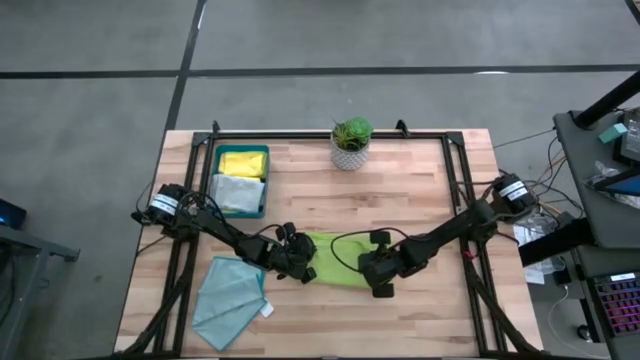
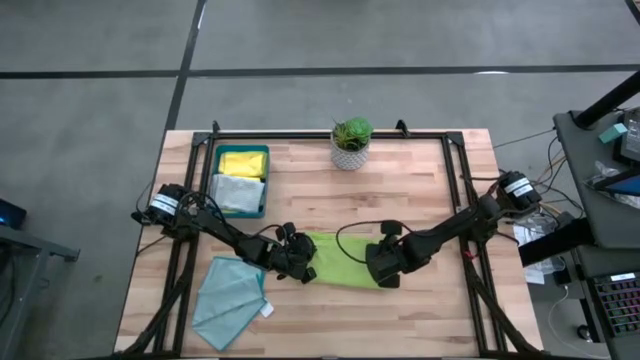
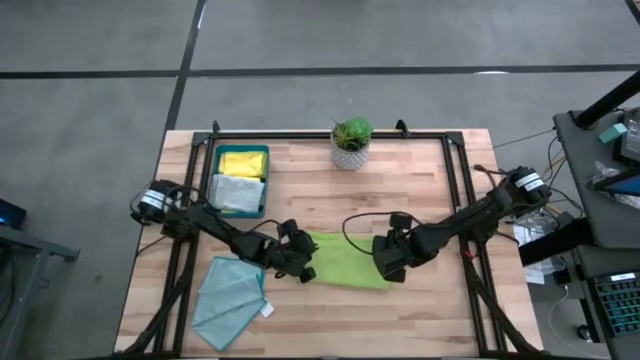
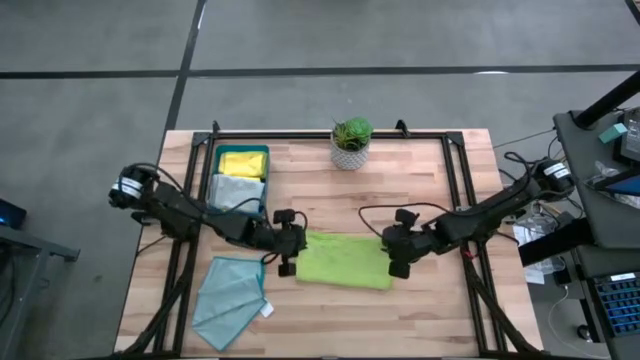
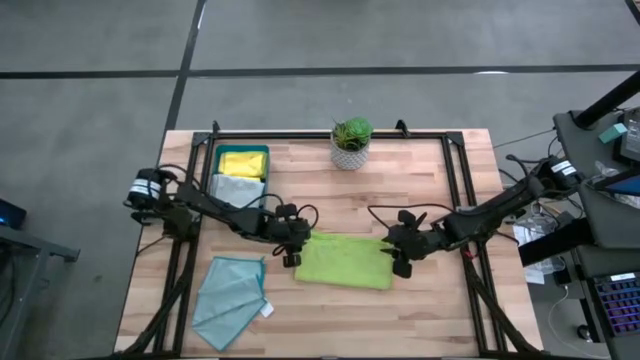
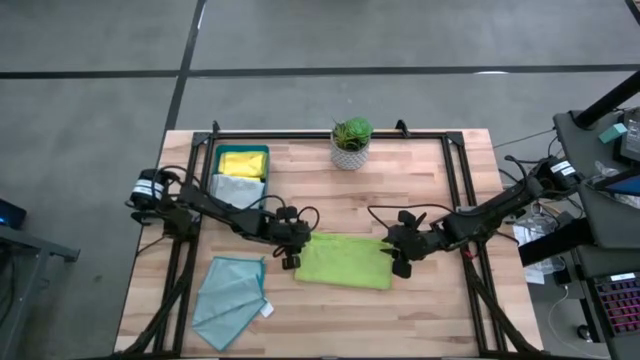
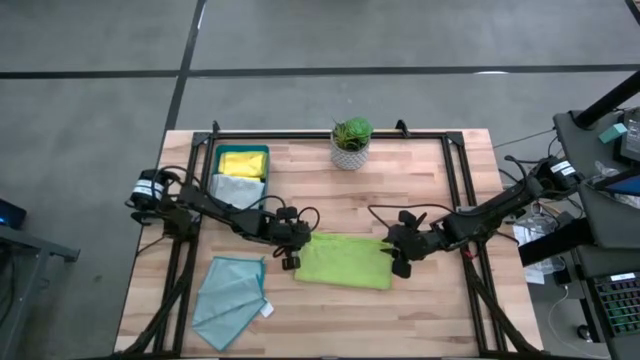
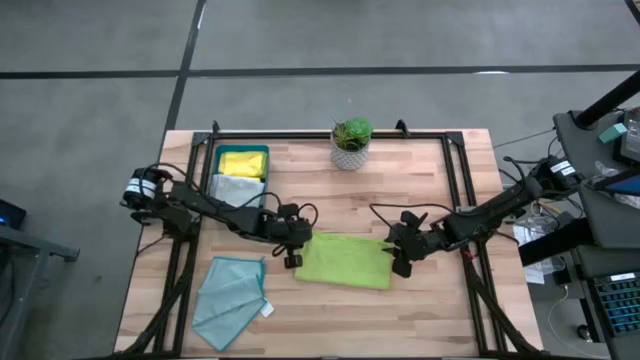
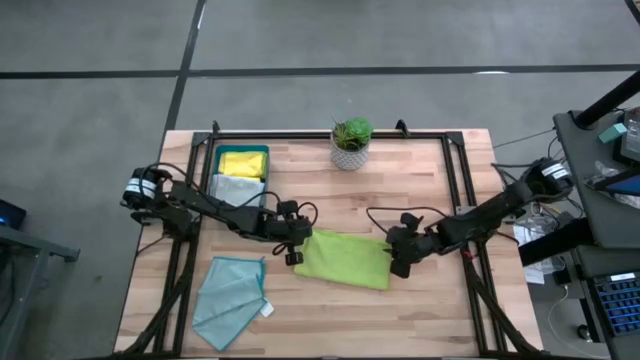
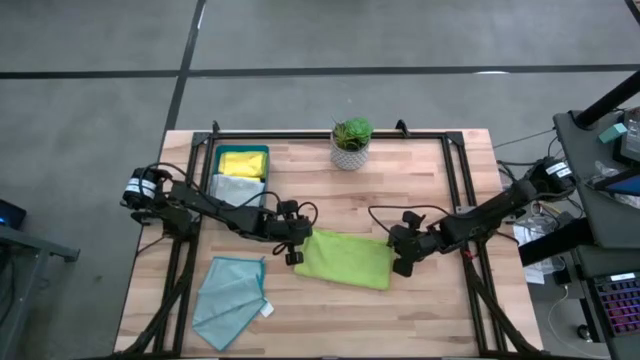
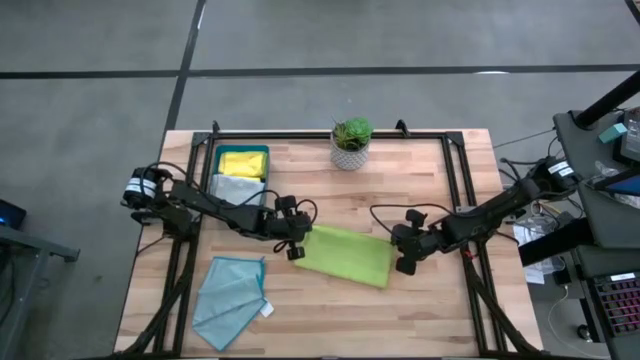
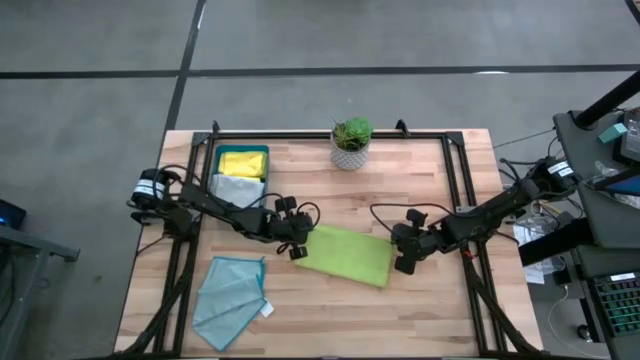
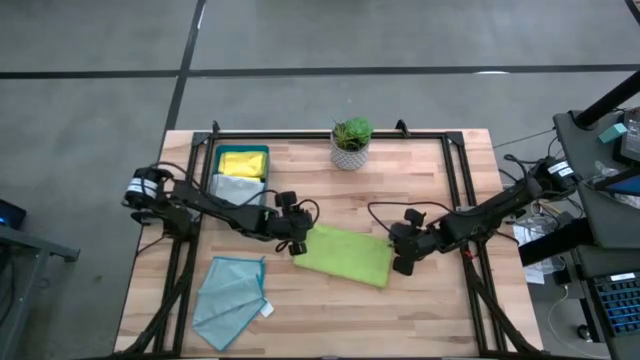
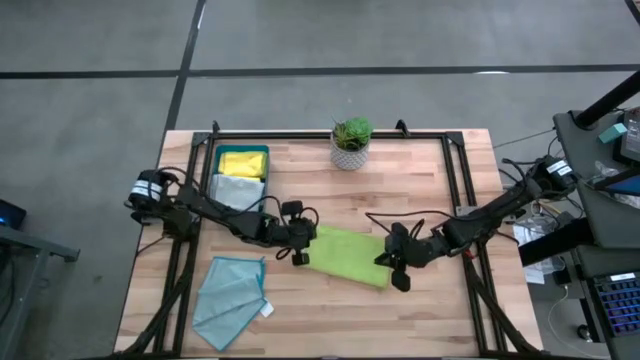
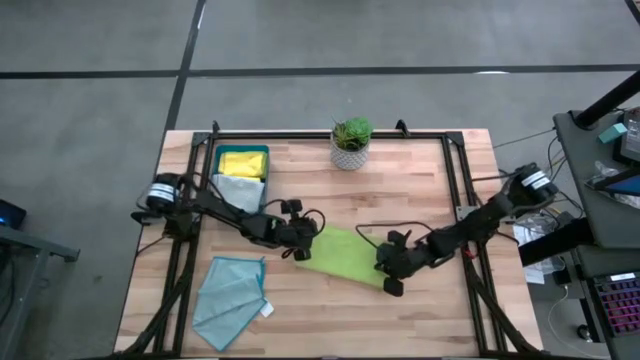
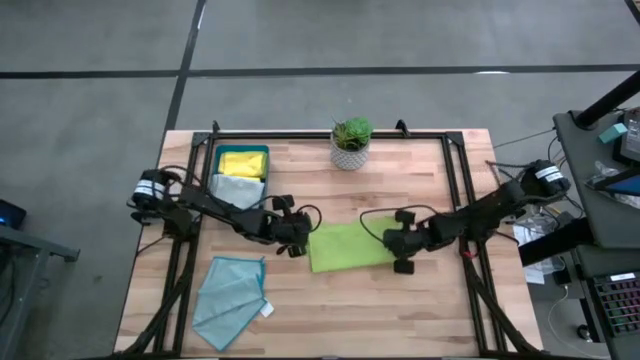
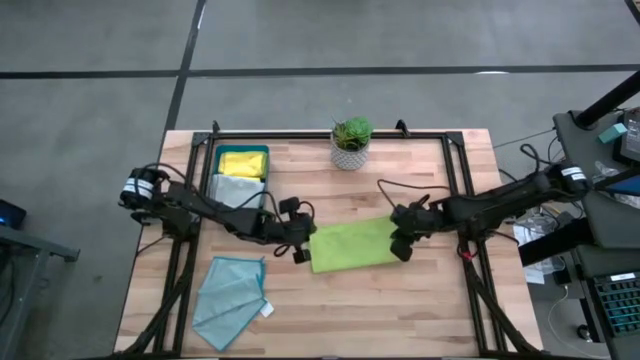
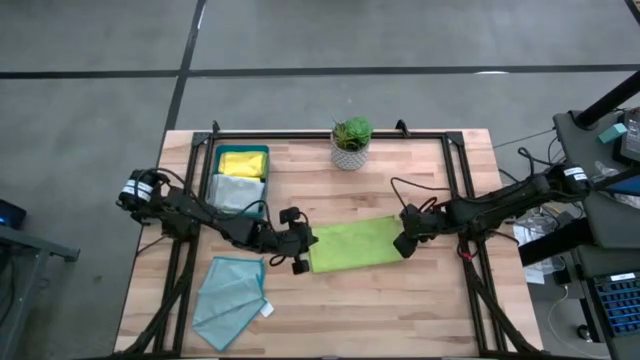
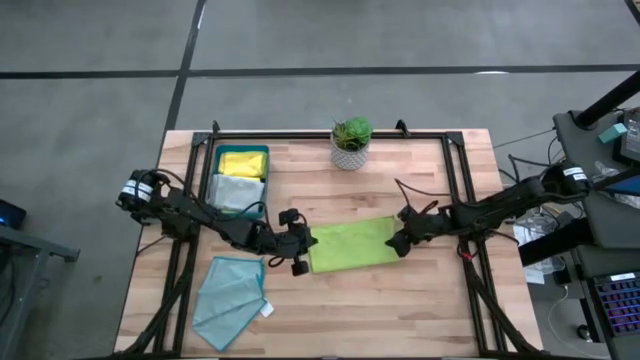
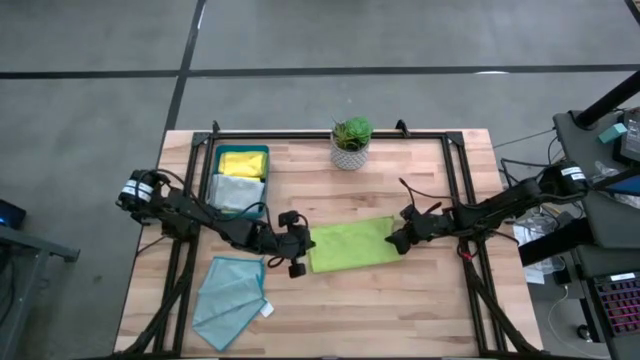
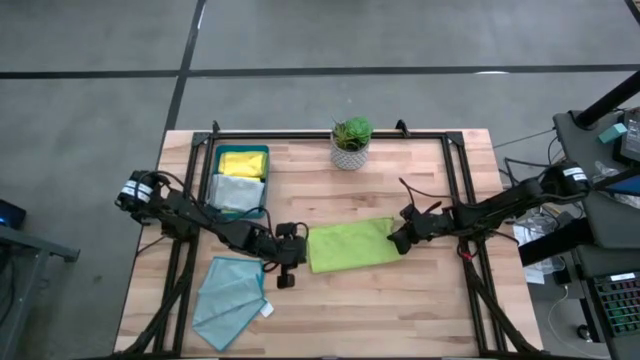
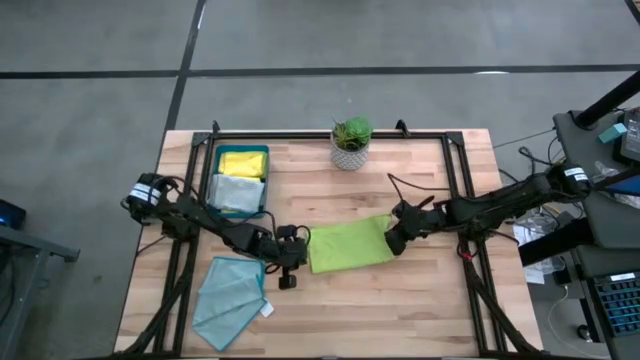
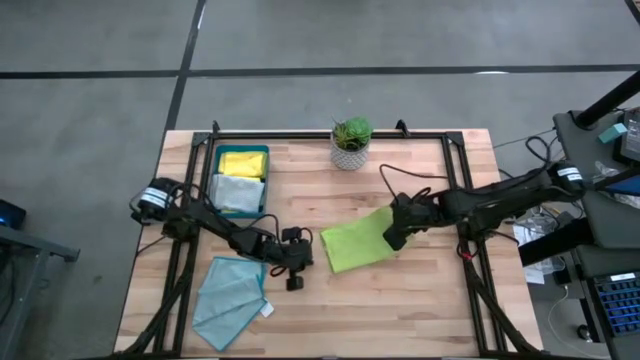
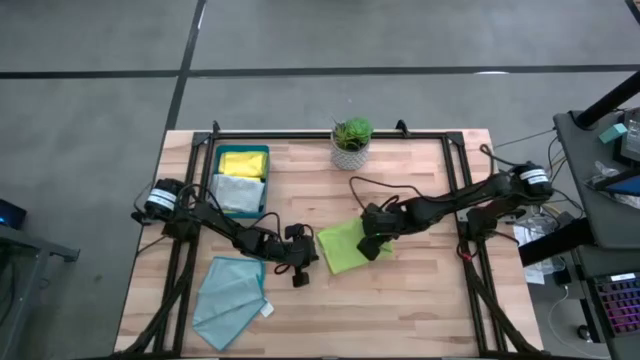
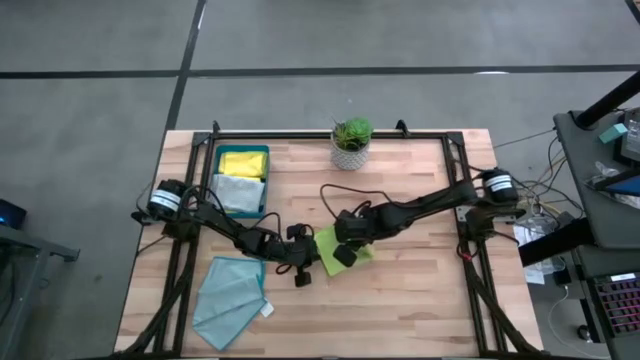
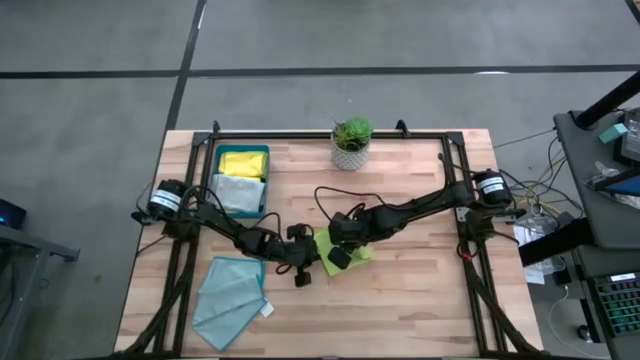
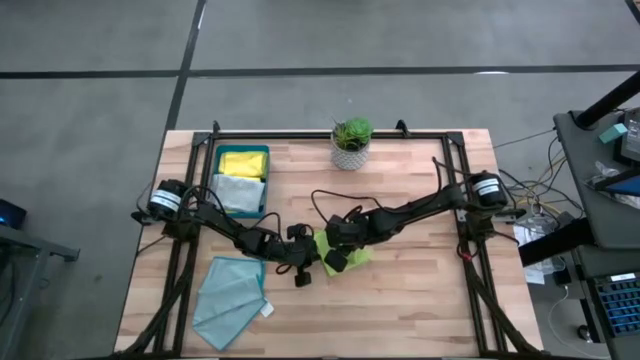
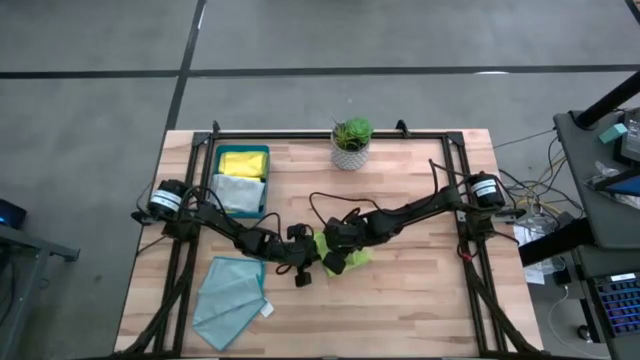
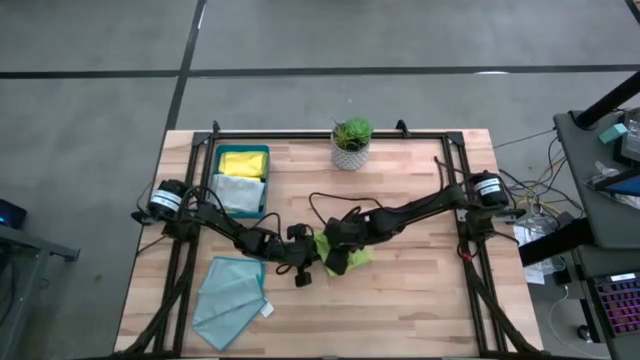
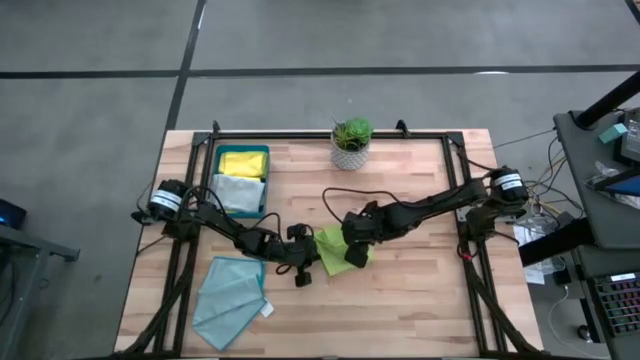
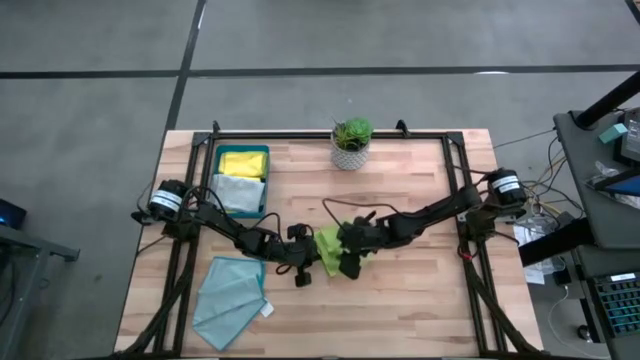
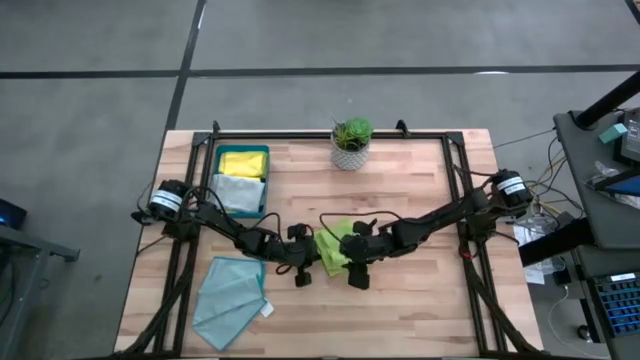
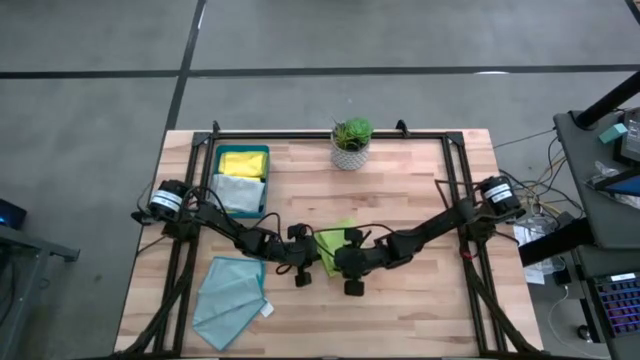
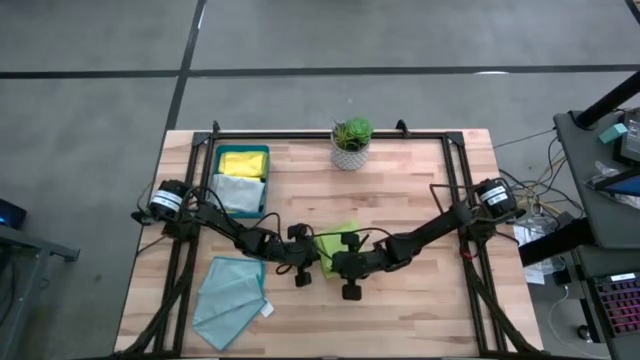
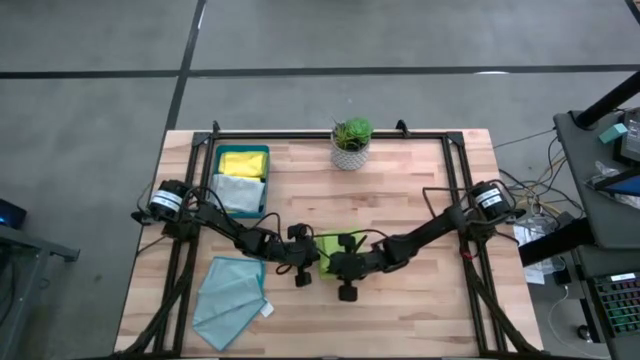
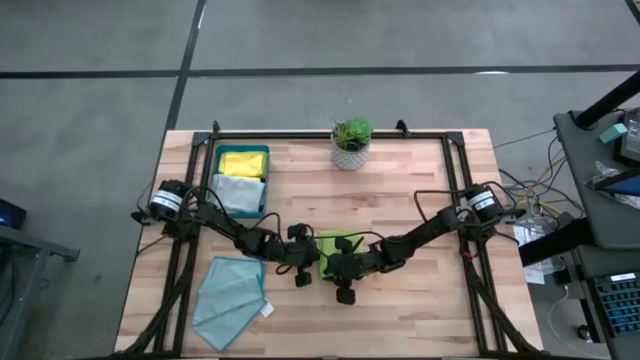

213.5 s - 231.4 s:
Task: Fold microfiber towels
Fold the green towel

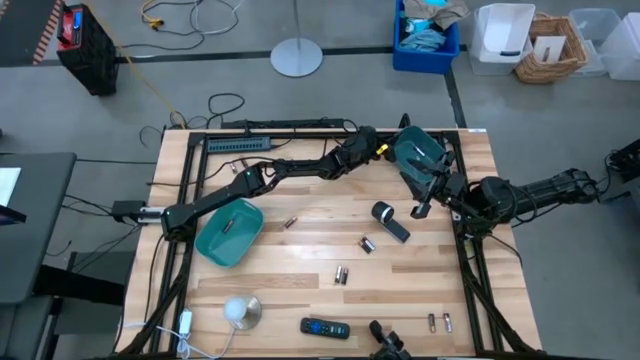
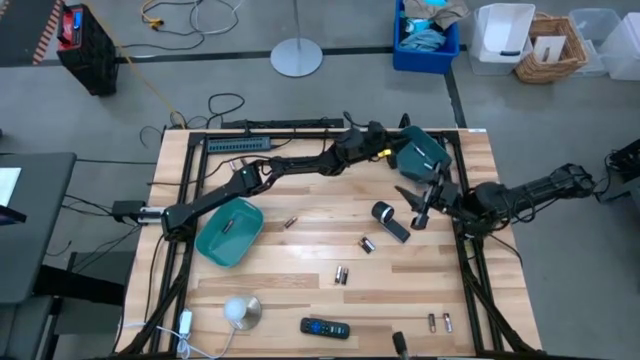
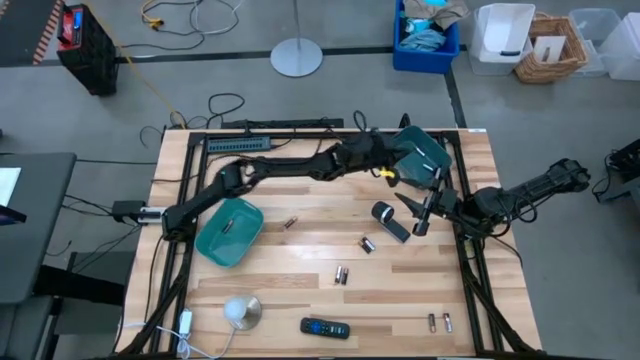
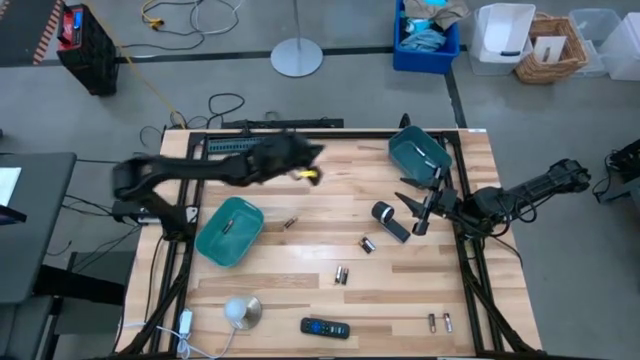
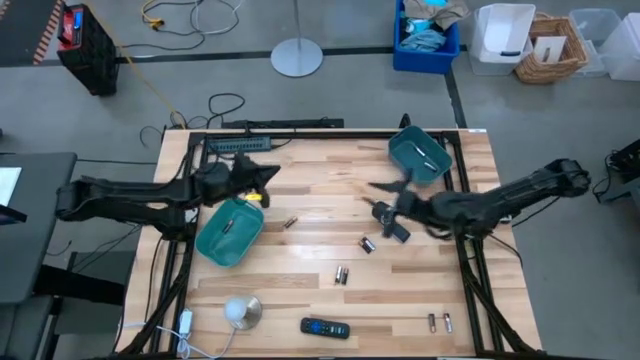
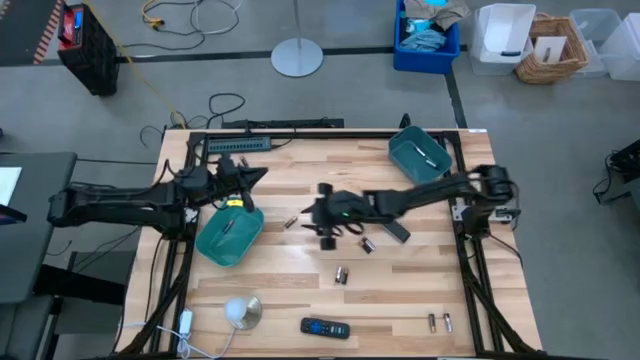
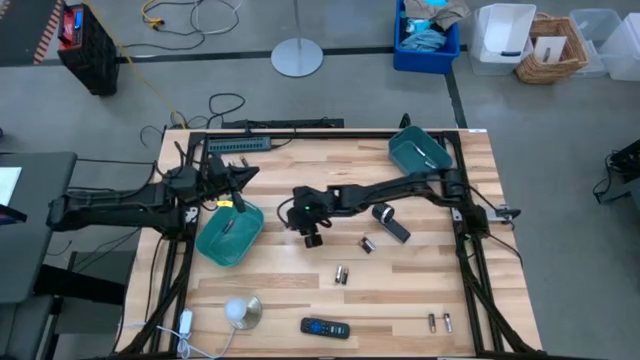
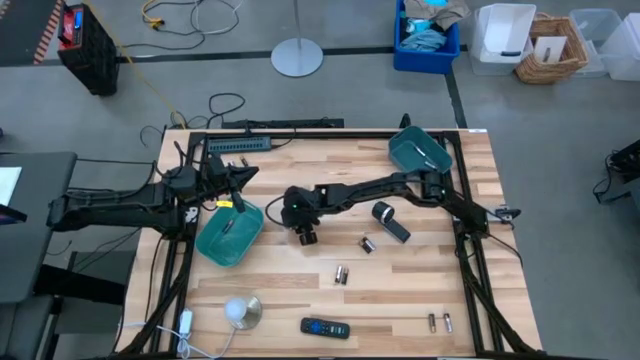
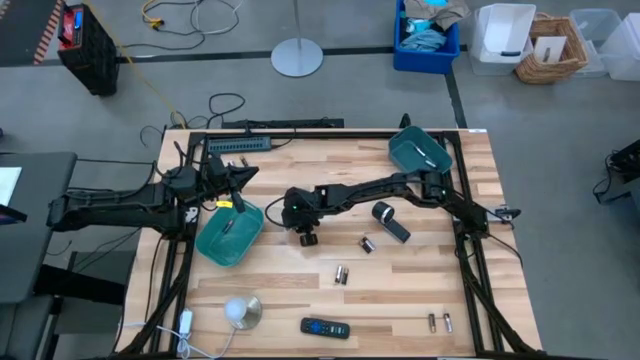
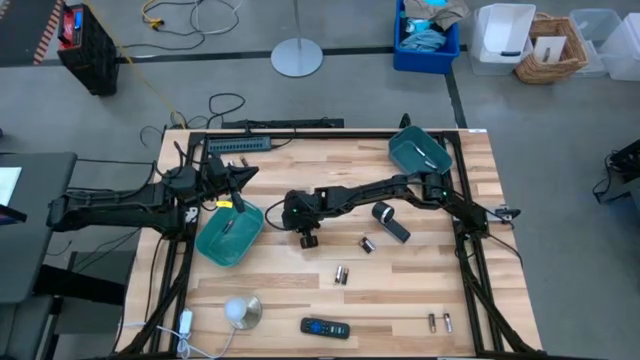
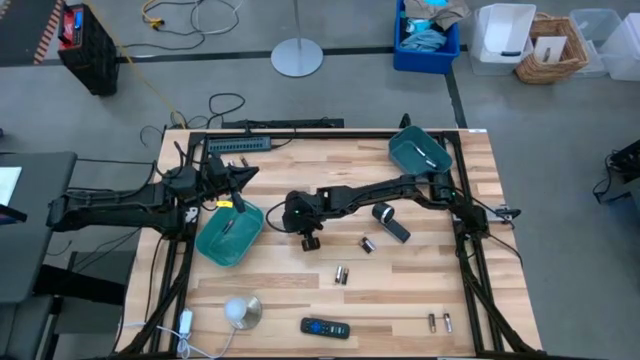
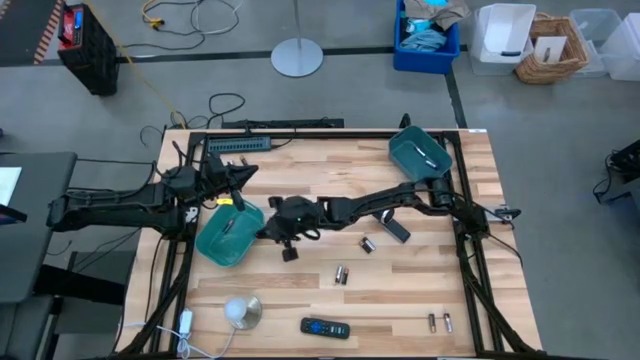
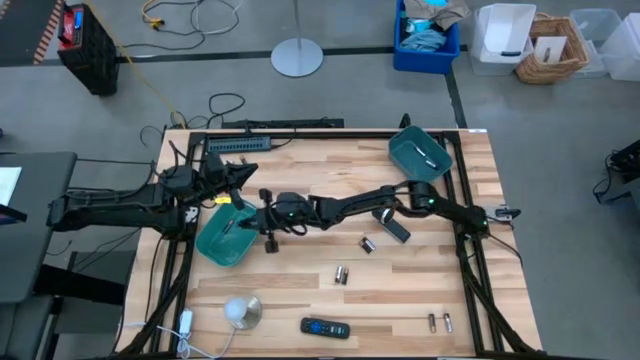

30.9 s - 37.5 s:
Task: Sort batteries
Put the black battery into the green bin
